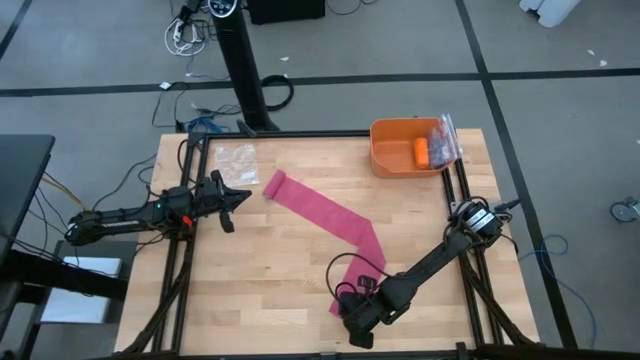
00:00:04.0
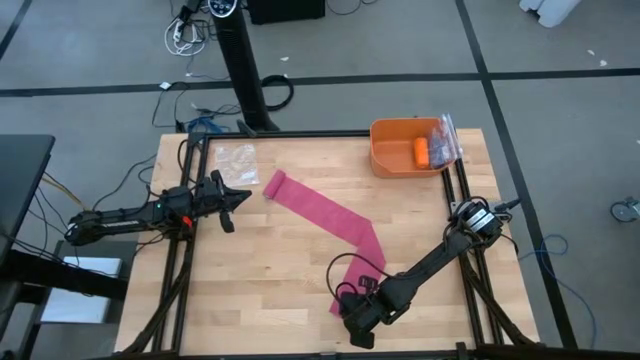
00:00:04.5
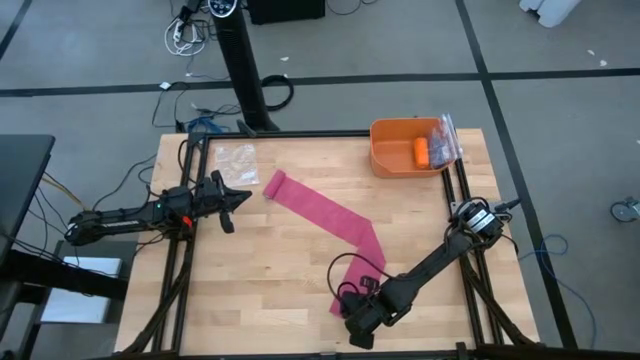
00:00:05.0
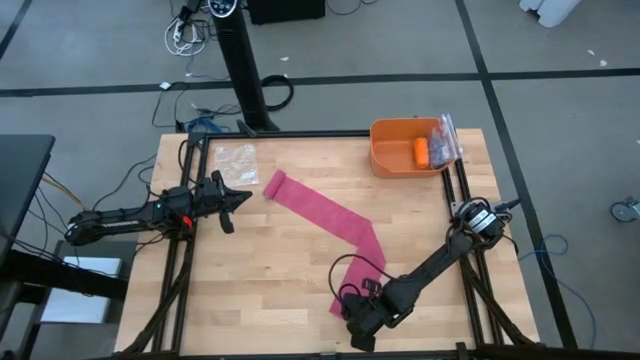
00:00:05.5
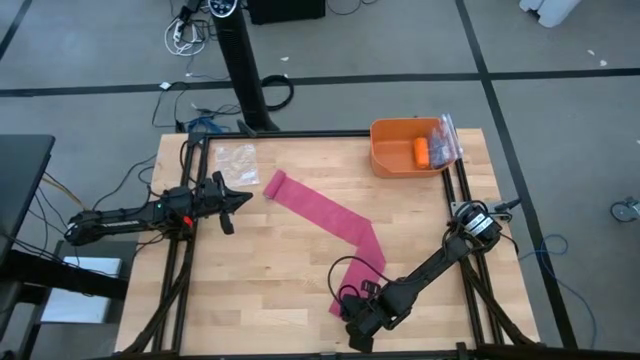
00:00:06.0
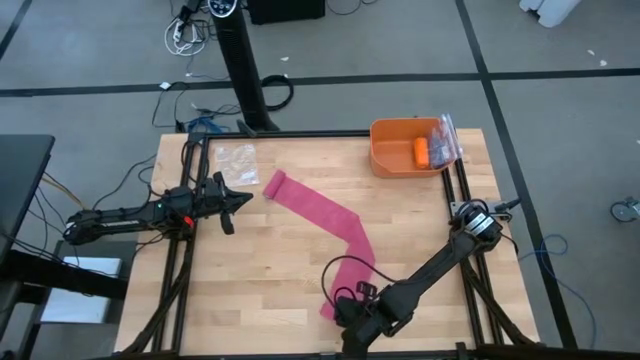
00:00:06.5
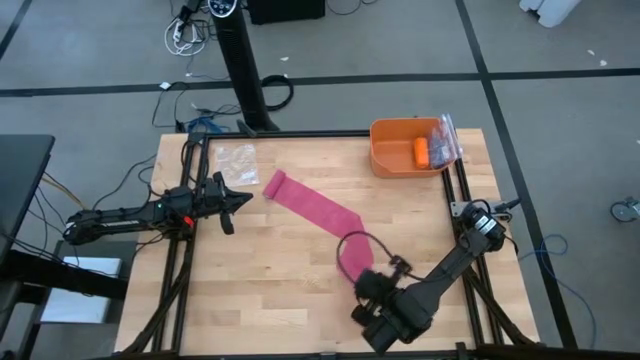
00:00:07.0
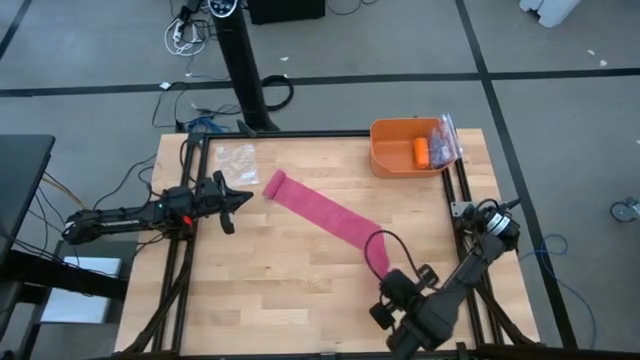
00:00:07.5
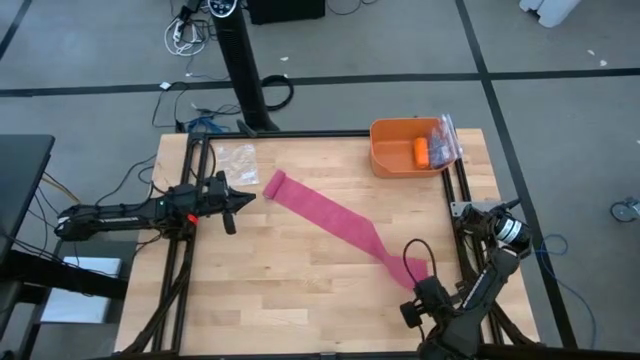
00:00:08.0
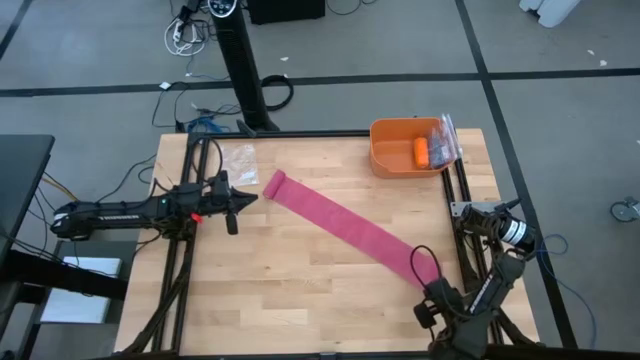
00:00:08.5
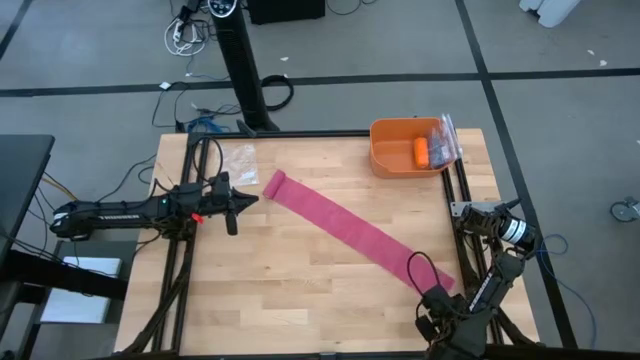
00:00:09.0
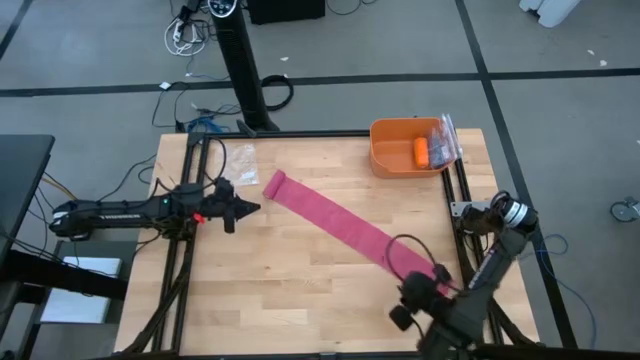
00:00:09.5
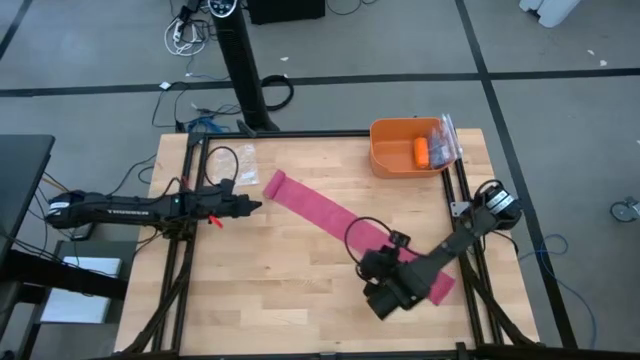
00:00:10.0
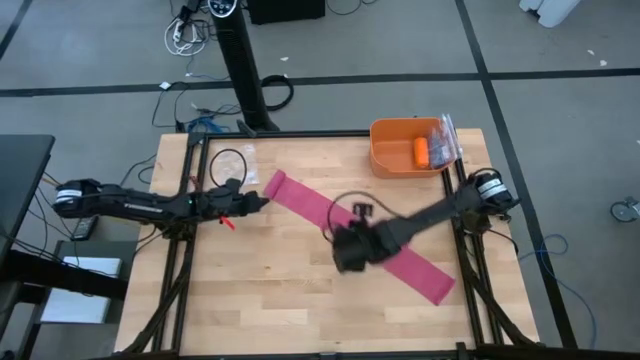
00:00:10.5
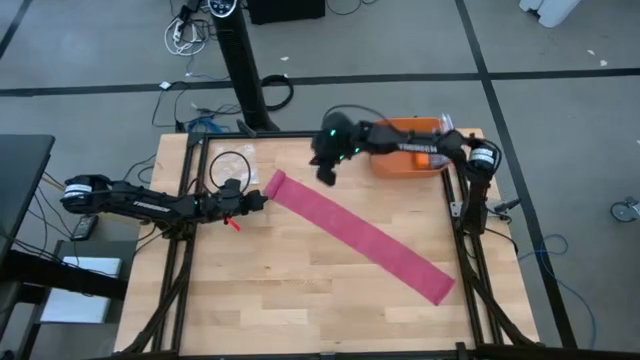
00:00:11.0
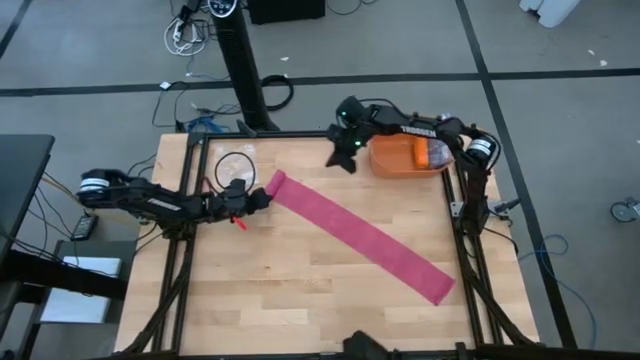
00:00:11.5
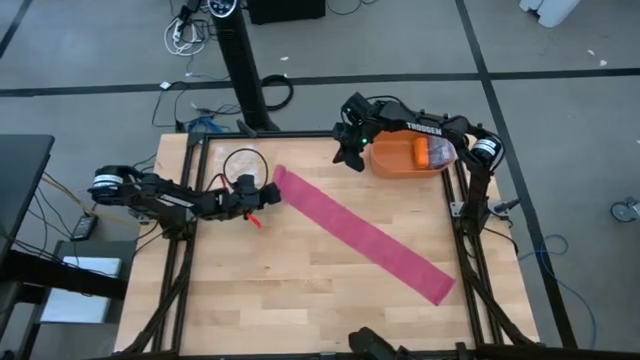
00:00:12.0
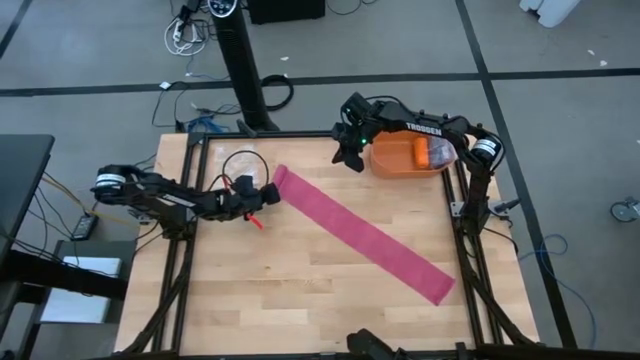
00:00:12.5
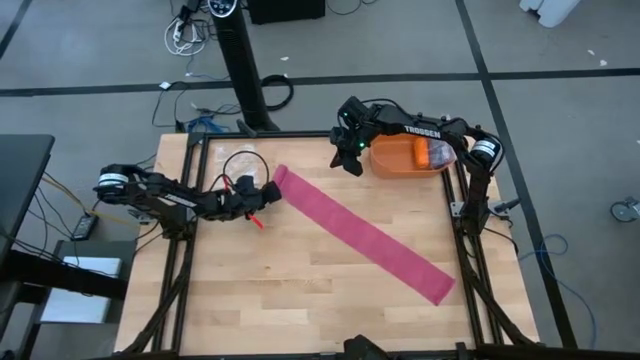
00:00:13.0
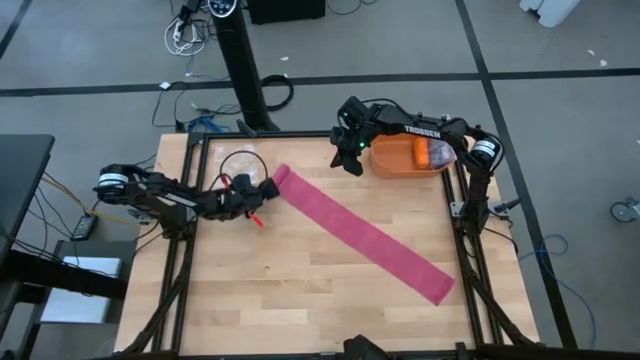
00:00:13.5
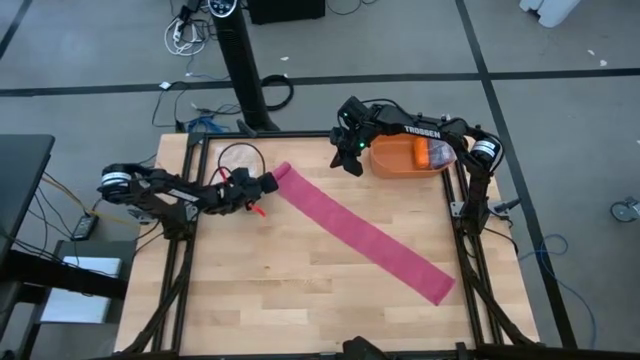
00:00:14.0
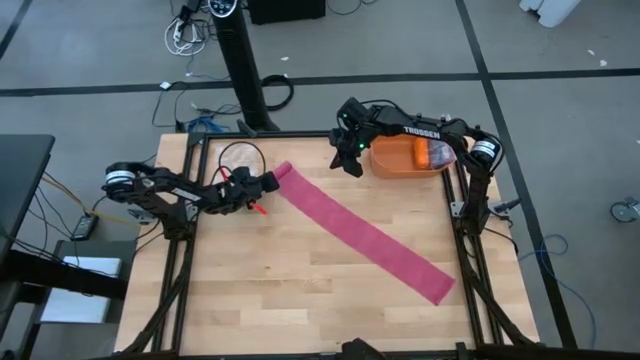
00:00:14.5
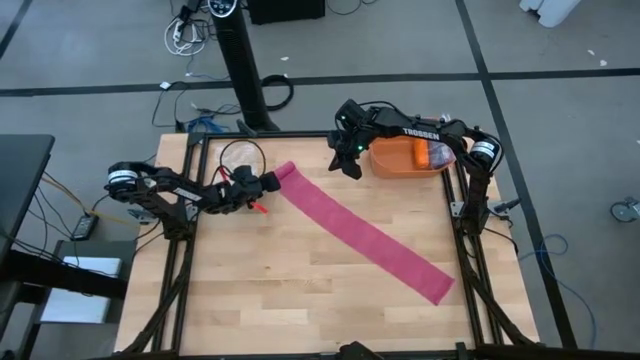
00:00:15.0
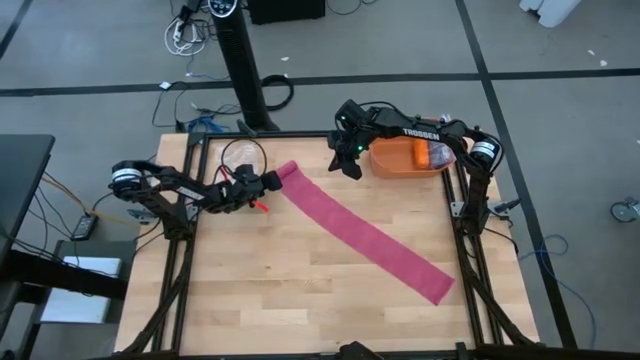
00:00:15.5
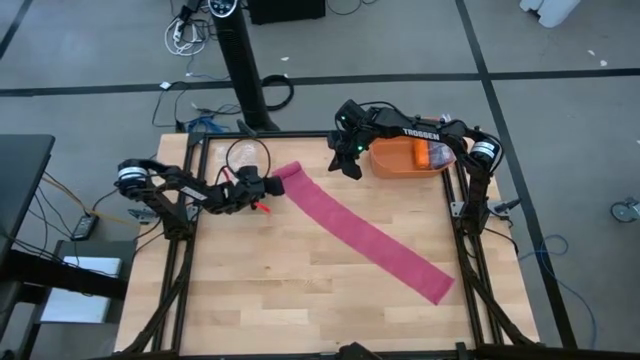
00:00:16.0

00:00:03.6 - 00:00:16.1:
Task: Roll bandage
Roll the pink bandage

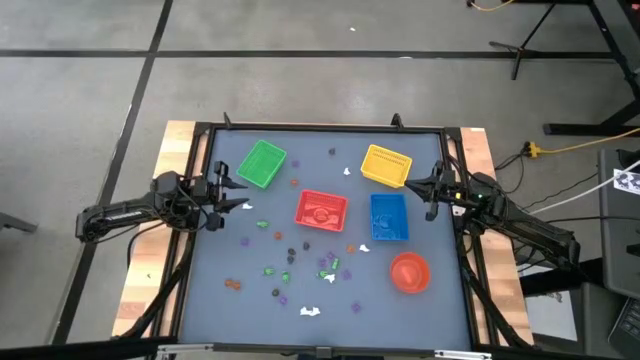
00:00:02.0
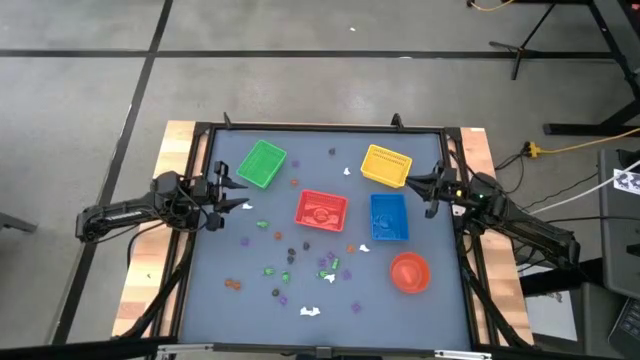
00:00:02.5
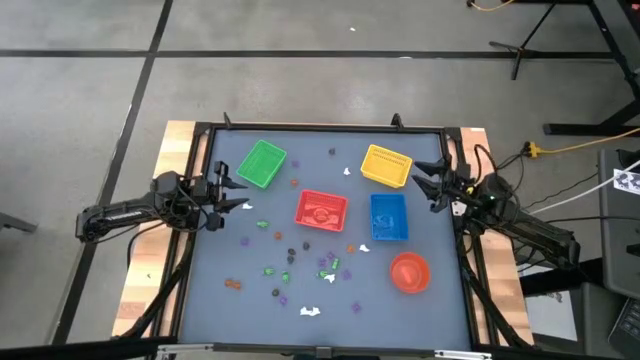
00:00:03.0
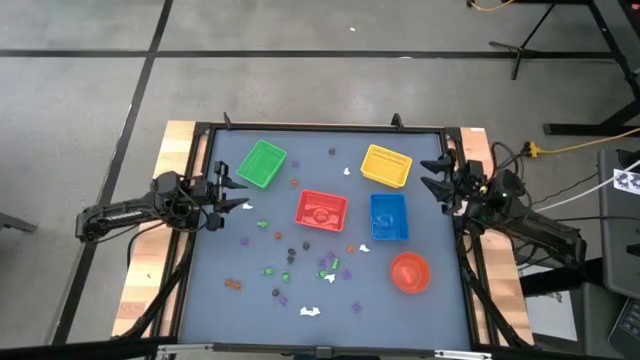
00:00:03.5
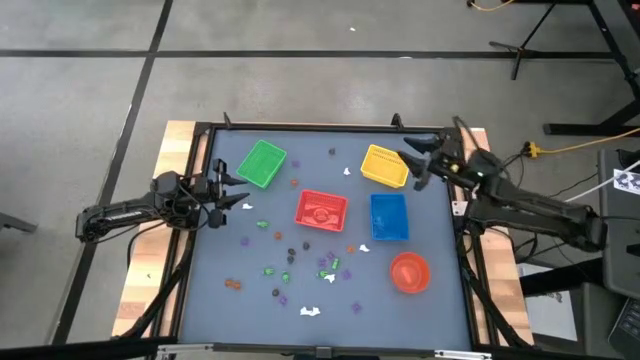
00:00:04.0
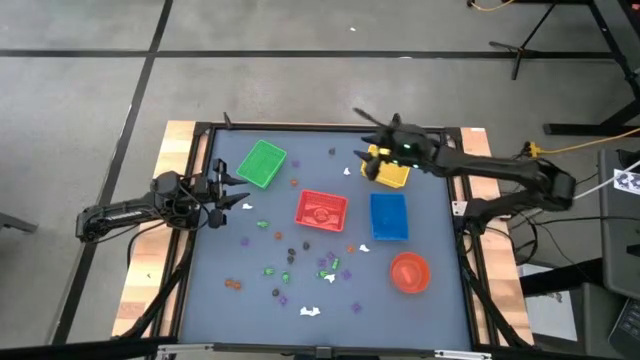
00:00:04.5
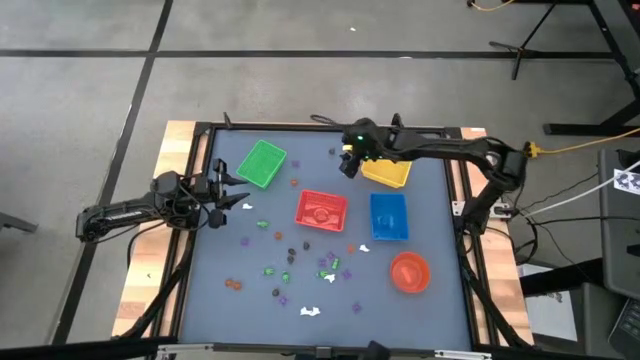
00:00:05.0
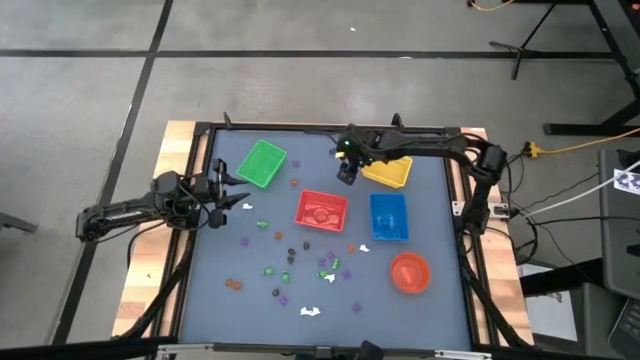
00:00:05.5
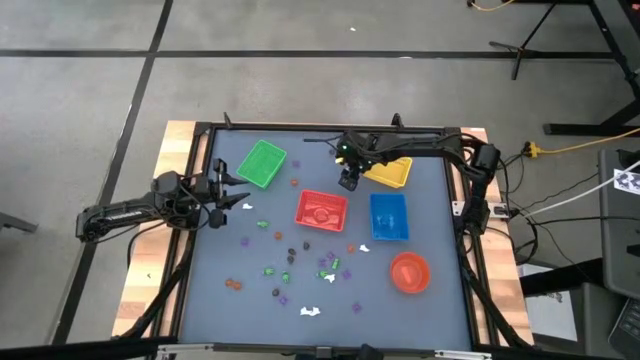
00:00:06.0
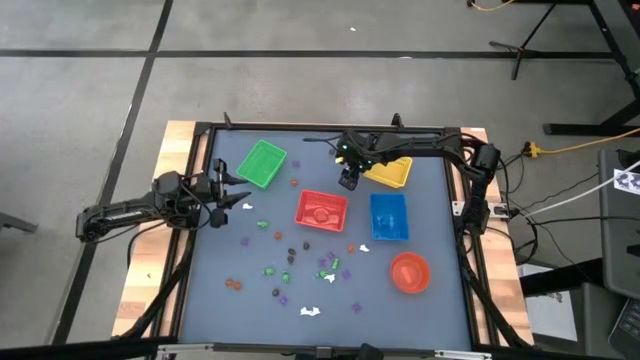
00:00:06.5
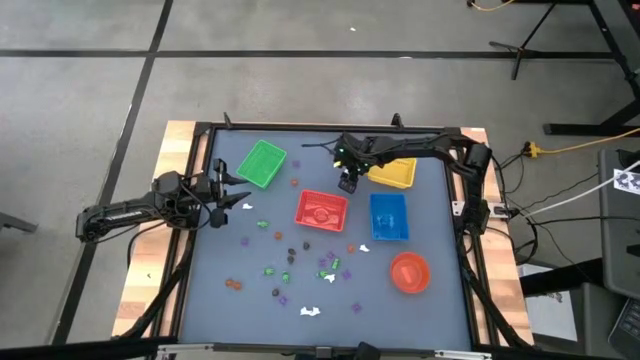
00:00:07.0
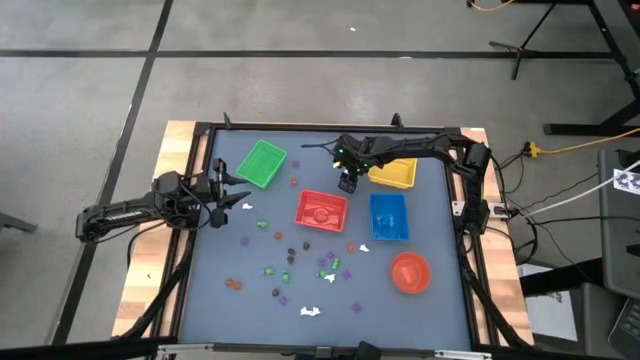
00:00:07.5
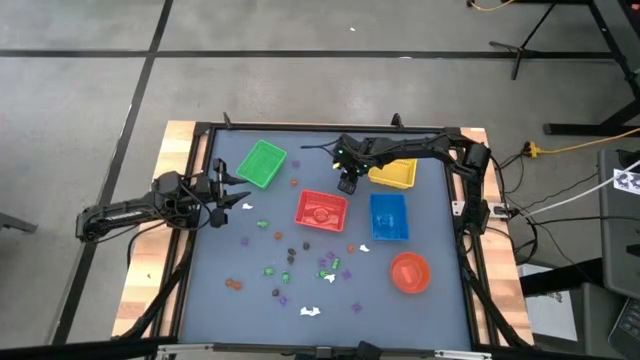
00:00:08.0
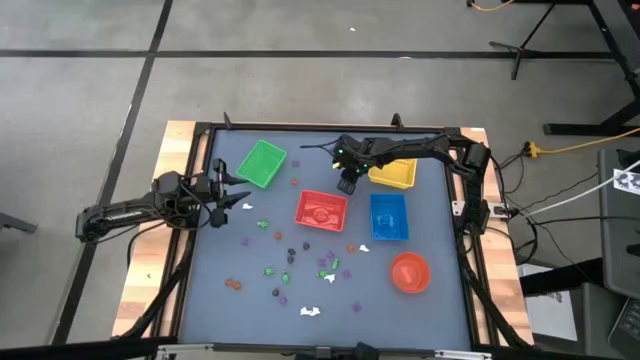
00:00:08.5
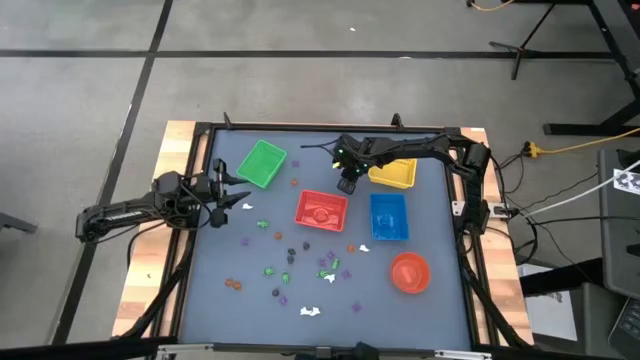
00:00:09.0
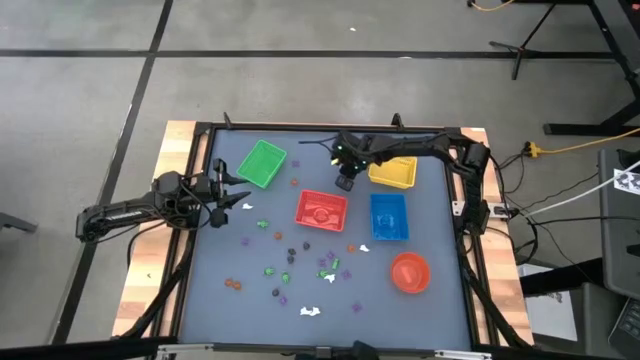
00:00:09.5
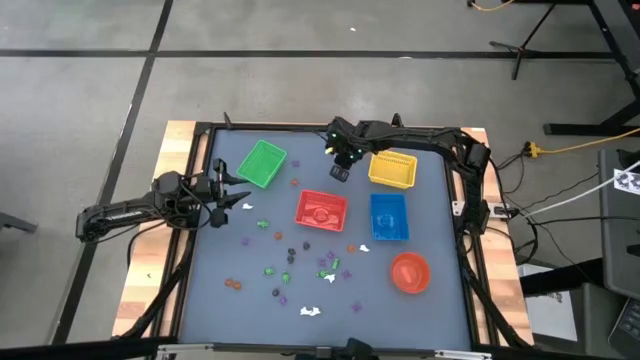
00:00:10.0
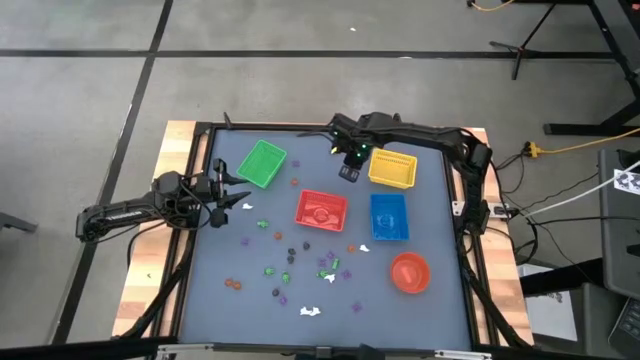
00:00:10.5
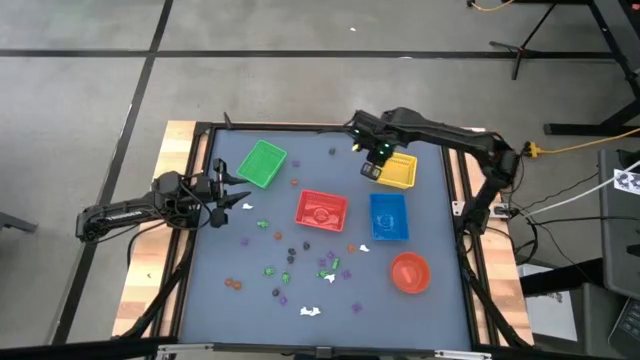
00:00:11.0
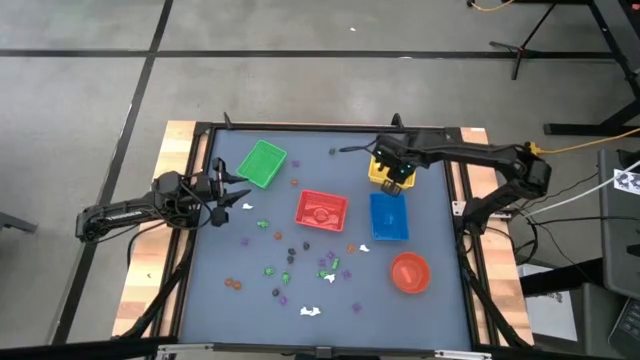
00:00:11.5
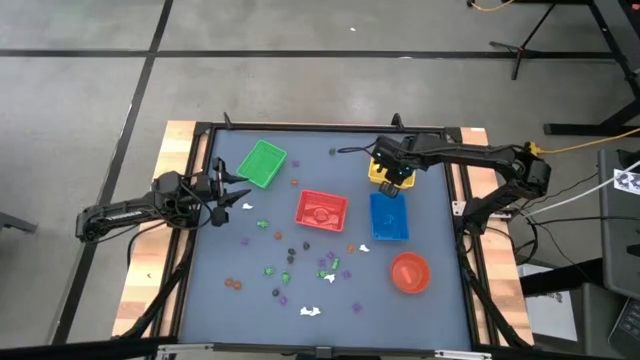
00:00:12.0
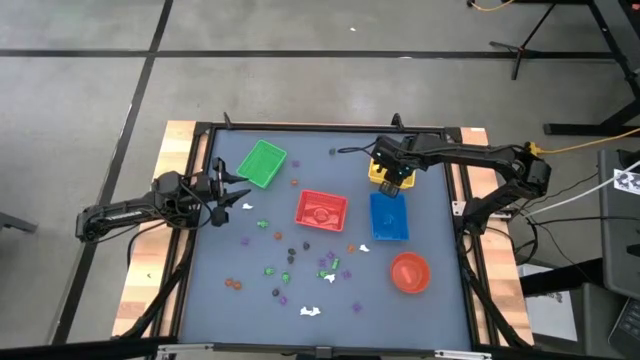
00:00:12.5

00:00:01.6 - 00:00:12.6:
Task: Sort Halloween decoration
Put the white ghost toy into the yellow bin
